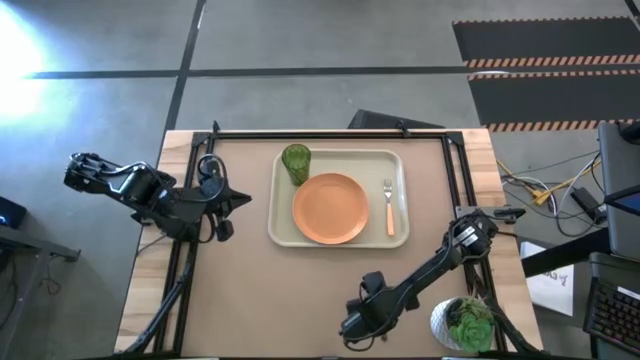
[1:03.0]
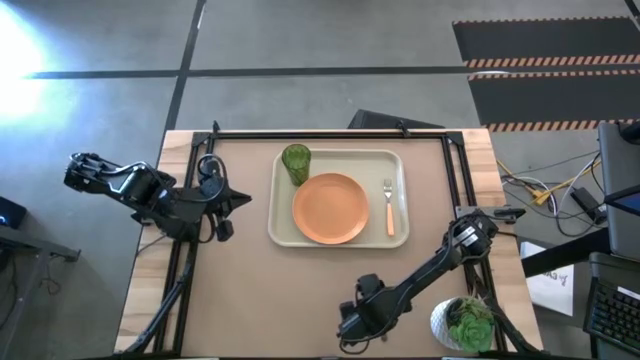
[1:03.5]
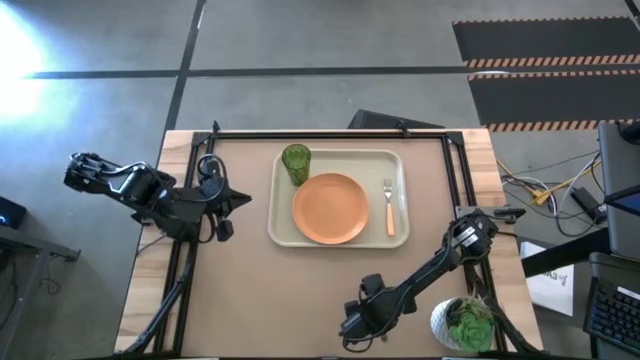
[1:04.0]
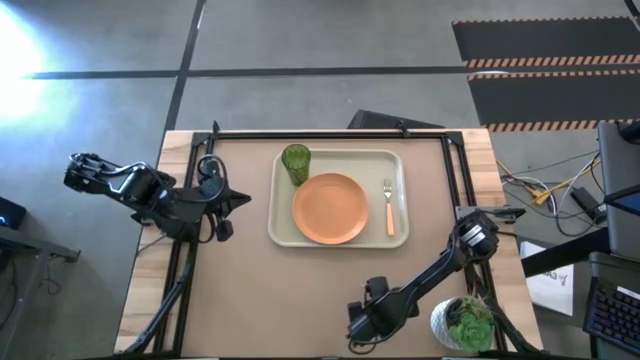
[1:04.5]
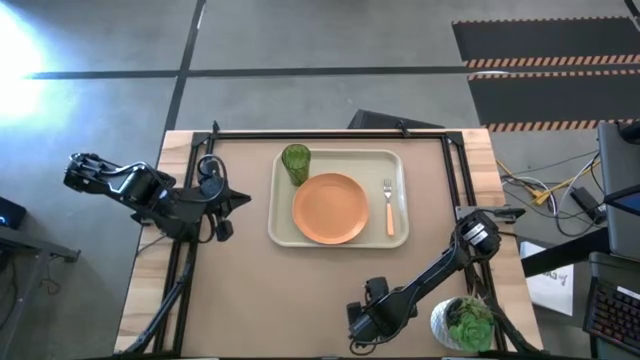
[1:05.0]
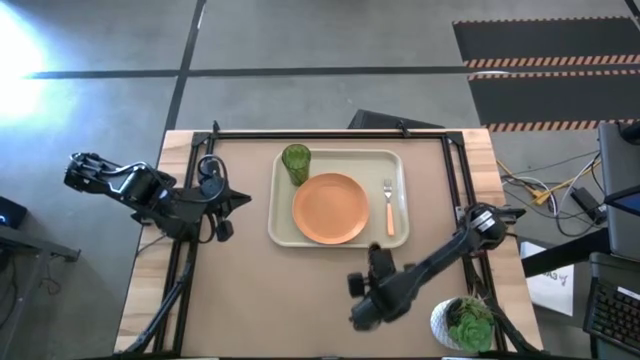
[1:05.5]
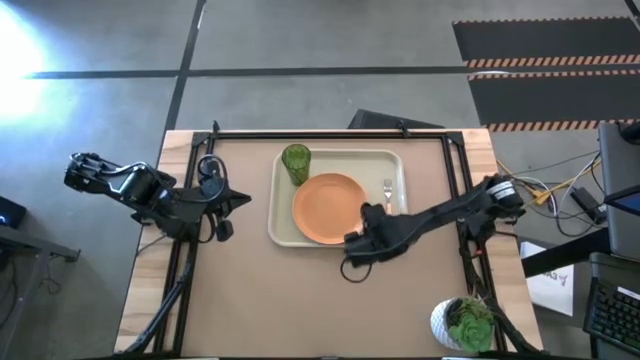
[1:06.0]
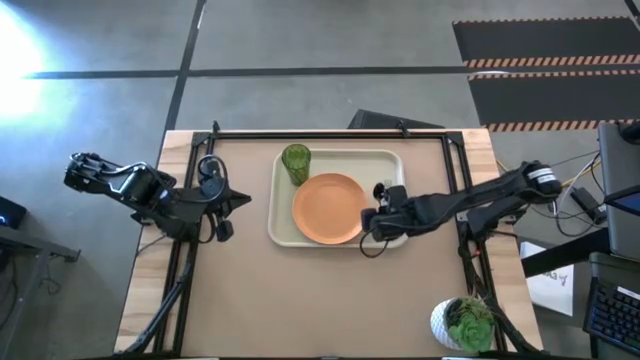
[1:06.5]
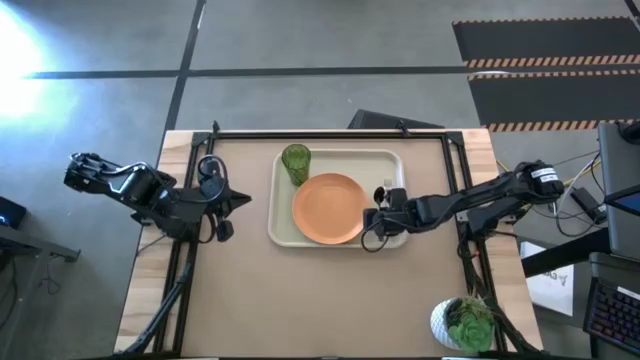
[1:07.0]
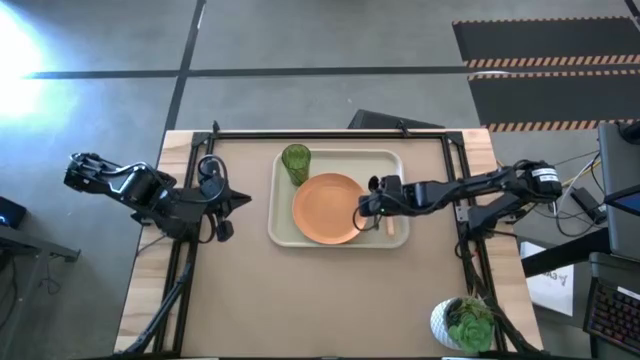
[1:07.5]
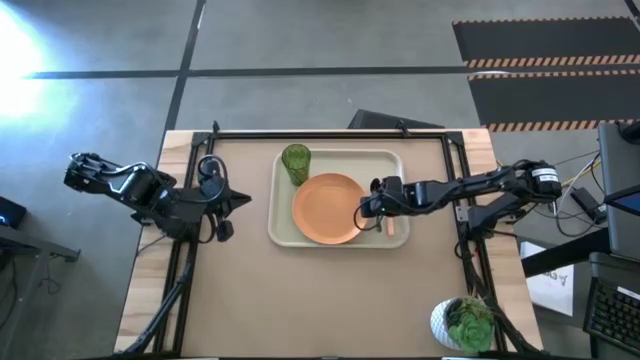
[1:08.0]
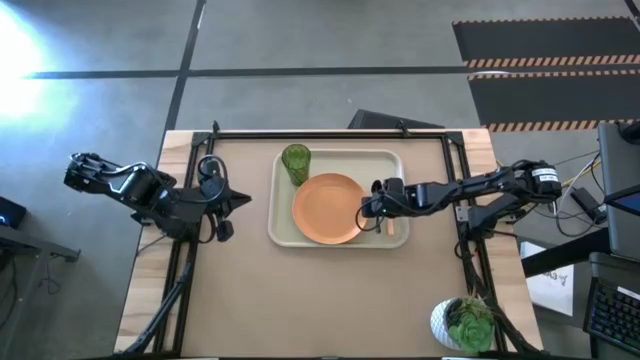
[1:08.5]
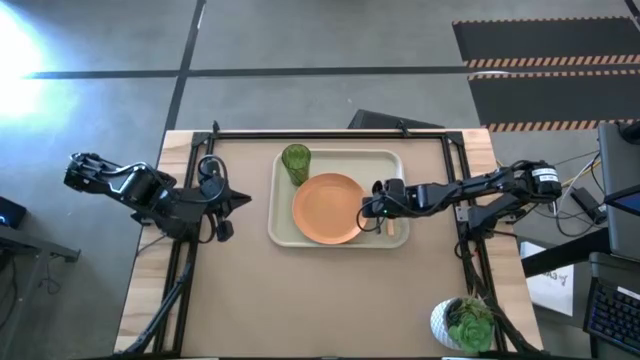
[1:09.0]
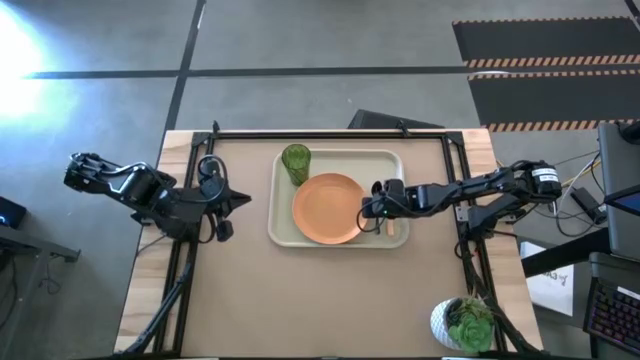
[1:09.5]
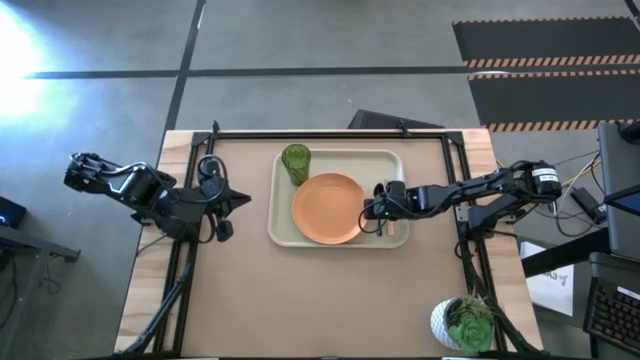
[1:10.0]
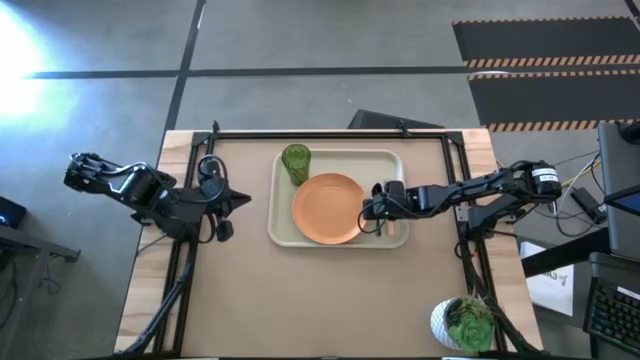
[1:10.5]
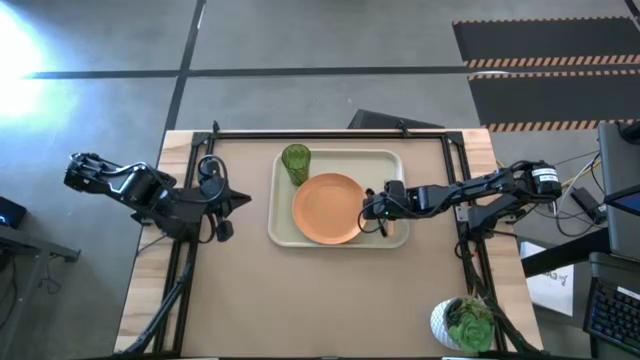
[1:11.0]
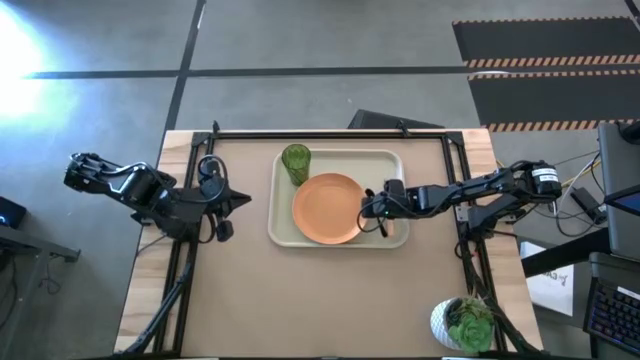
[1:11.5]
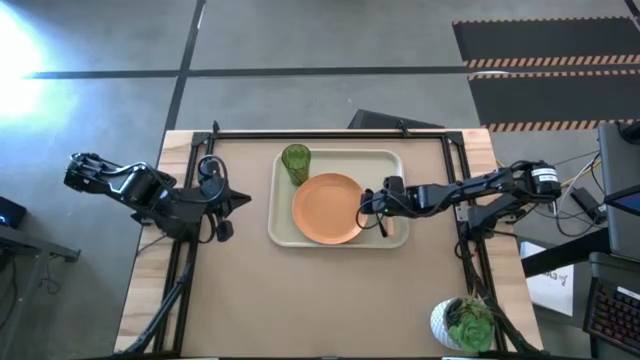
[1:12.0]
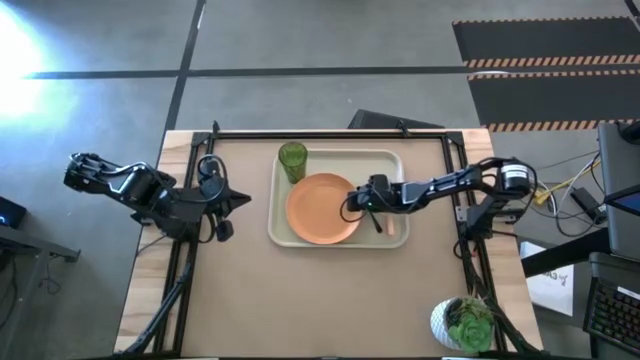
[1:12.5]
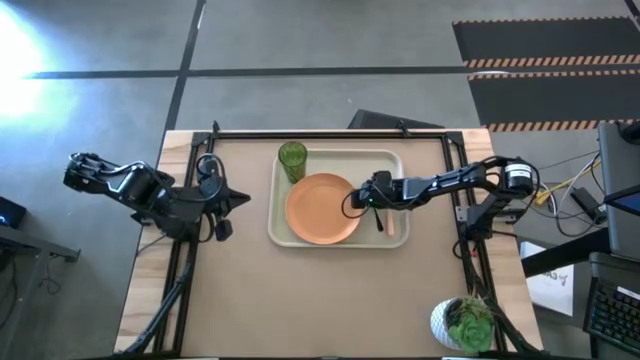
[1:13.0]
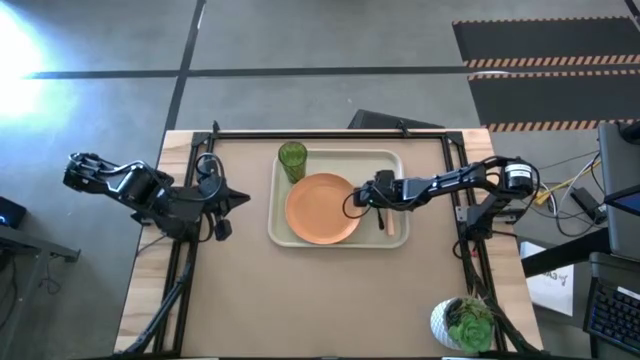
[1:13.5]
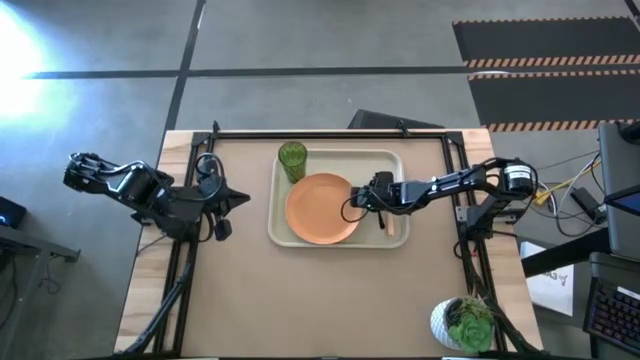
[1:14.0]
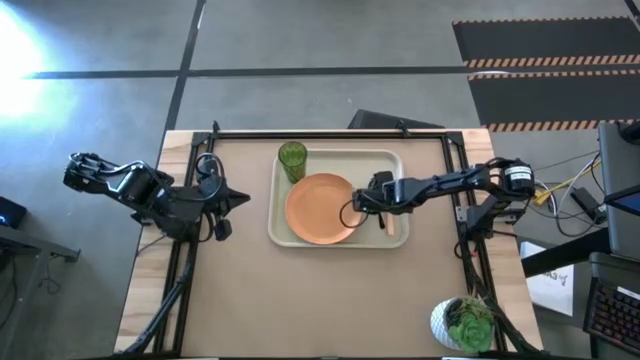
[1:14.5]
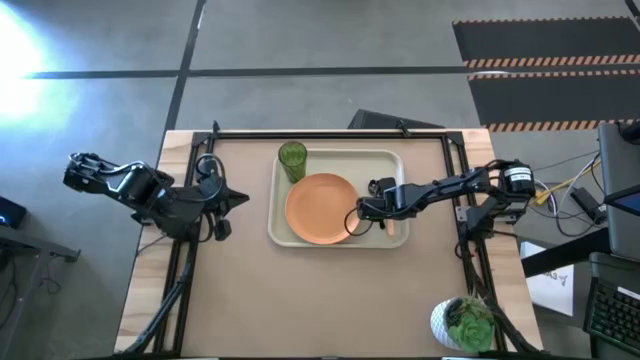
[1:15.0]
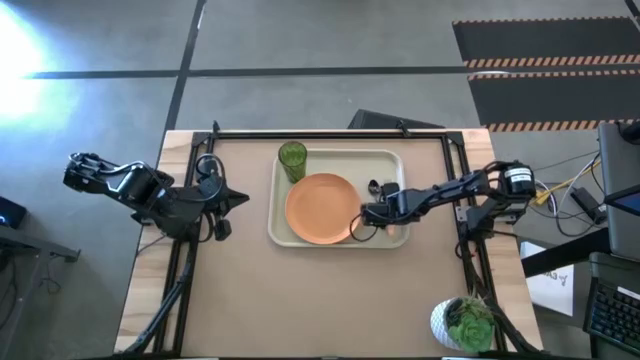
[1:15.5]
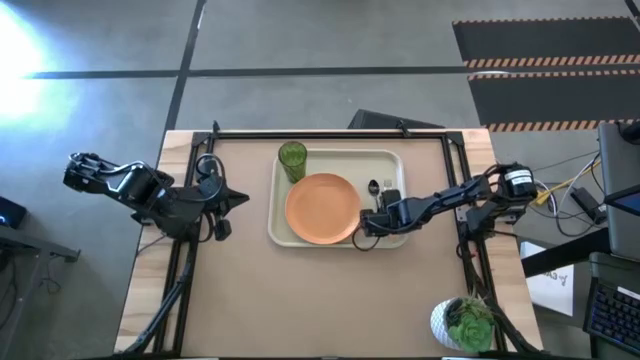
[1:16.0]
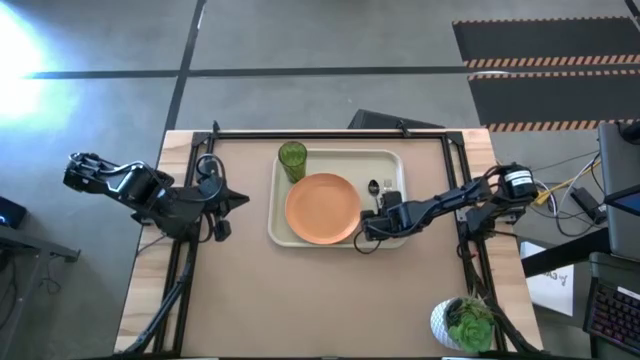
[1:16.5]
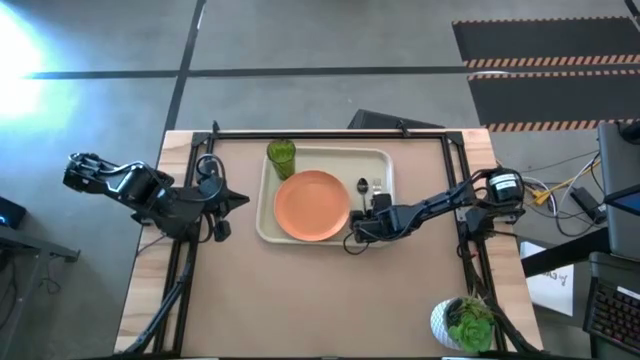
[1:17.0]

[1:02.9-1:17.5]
Task: Pick and place plate/cup/fork/spoon on tray
Put the black spoon on the light brown serving tray to the right of the orange plate

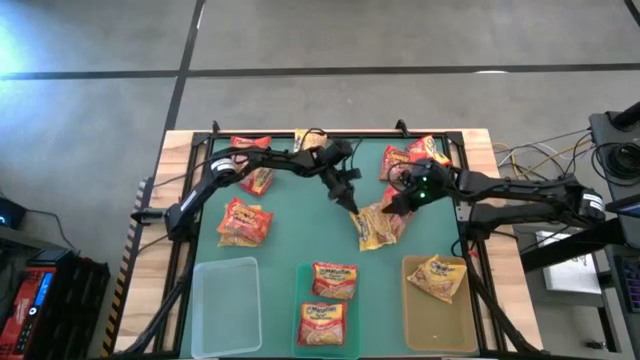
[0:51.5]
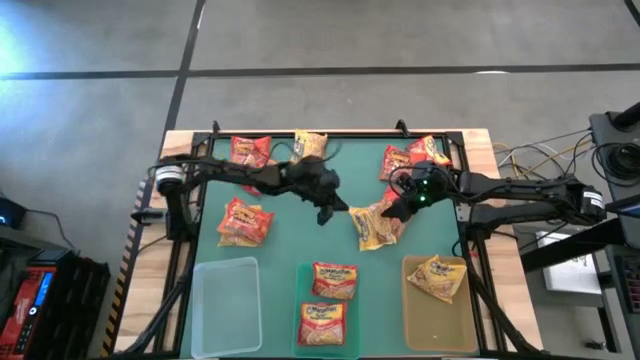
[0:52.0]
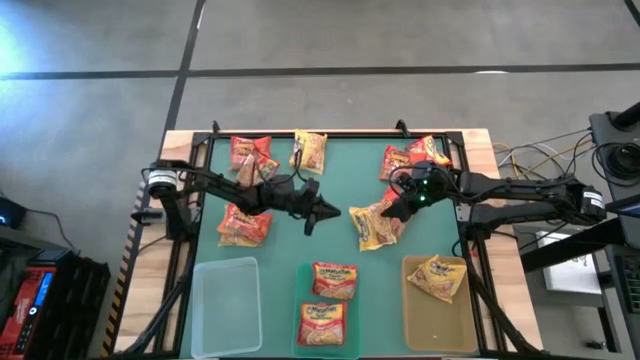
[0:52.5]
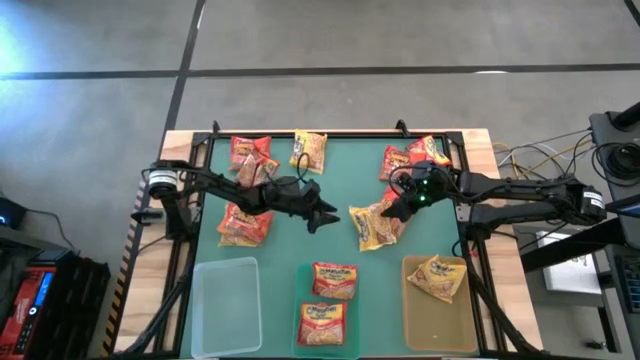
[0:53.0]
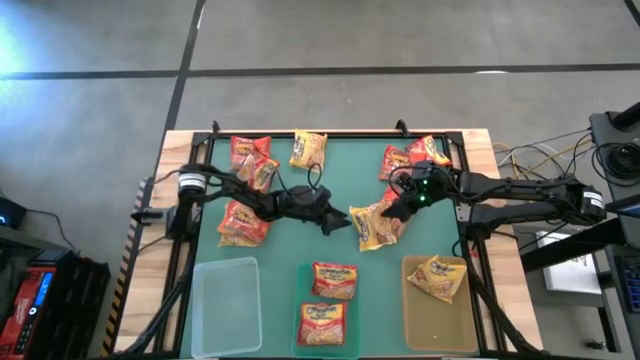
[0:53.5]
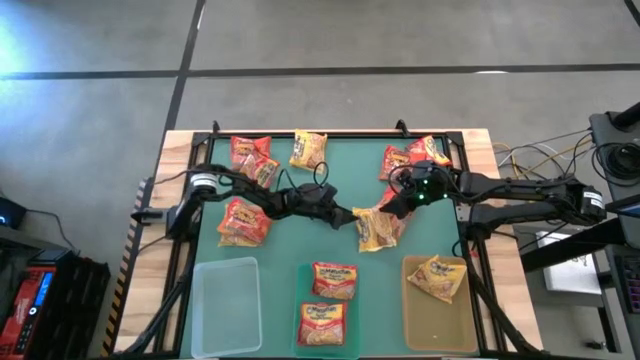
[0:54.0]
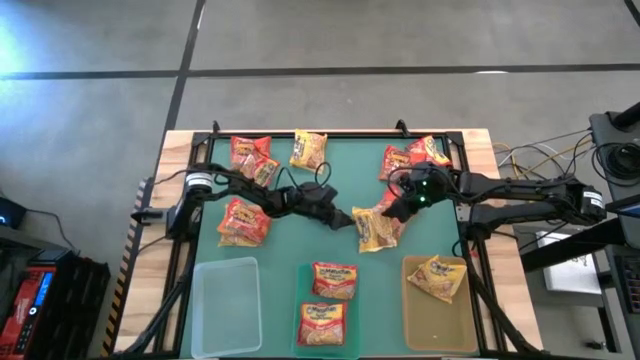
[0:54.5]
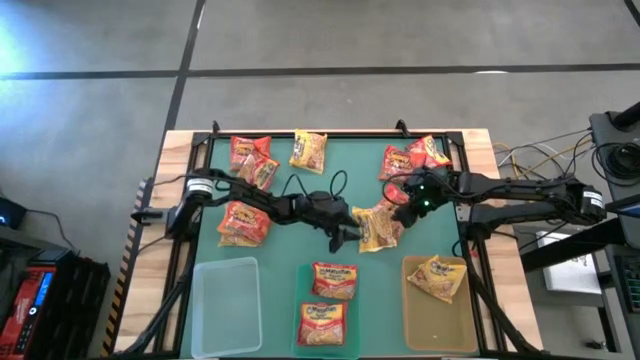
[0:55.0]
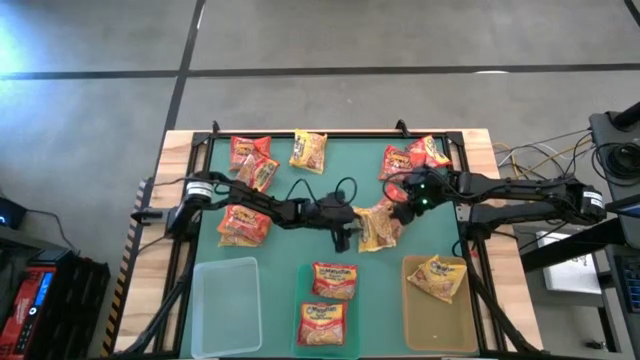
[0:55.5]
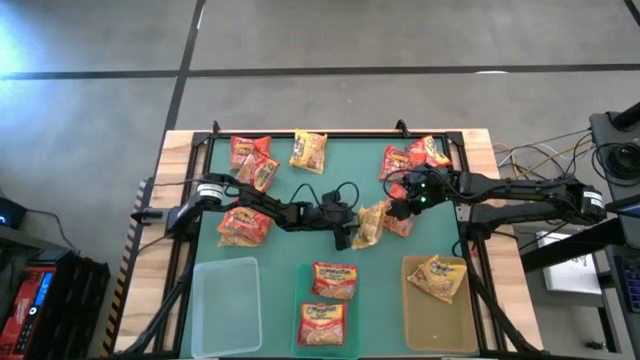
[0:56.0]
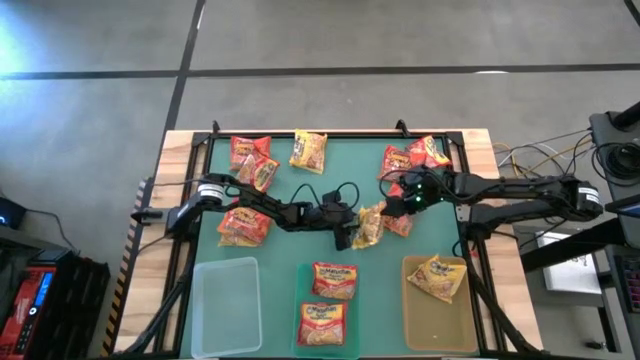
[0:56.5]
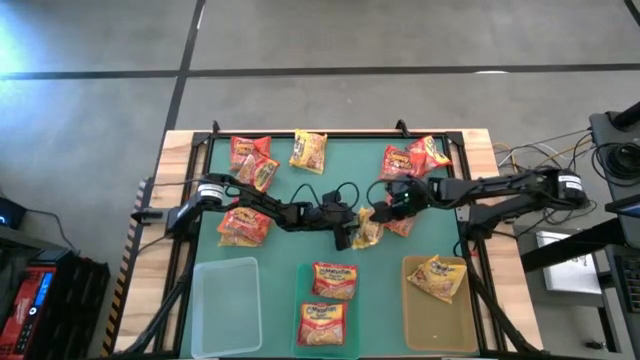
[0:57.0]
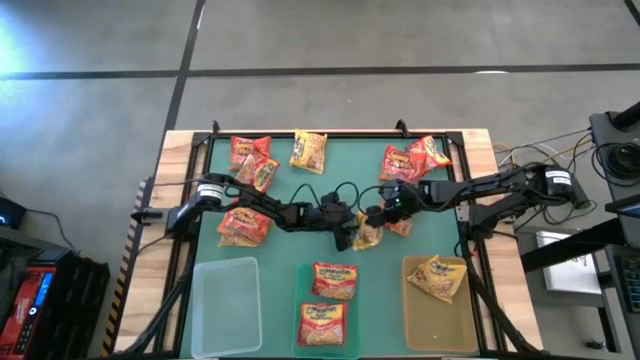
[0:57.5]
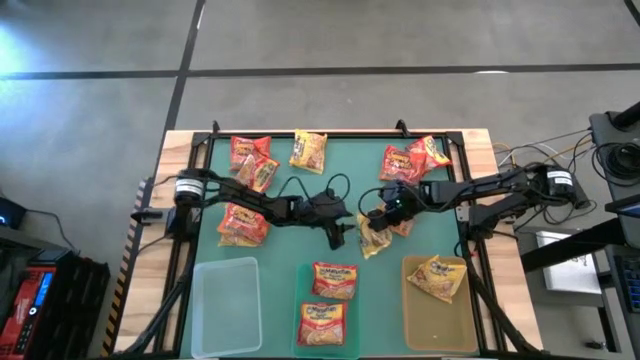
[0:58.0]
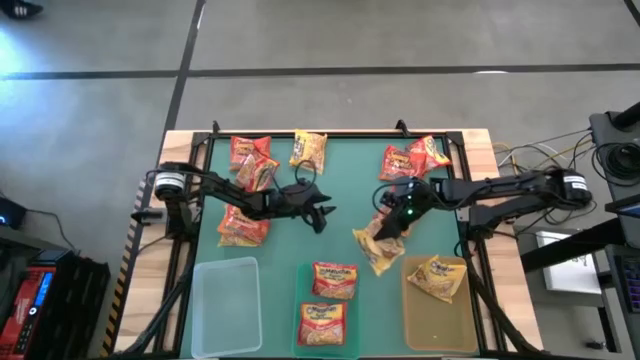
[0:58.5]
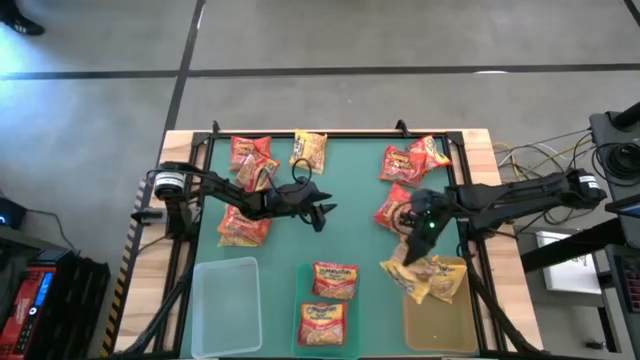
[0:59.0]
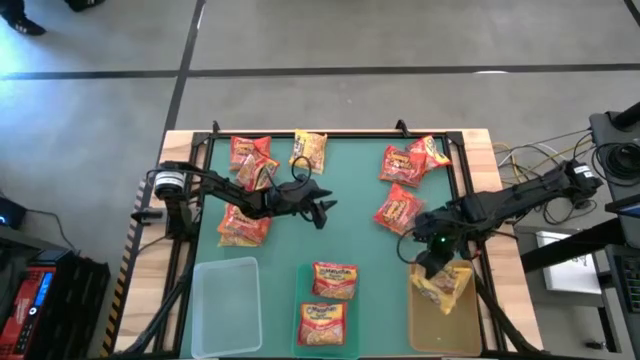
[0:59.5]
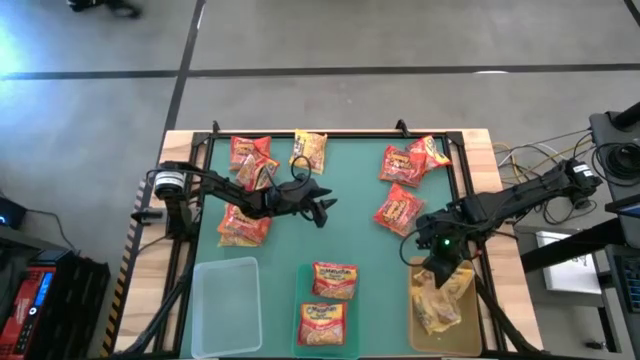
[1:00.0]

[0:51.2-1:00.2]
Task: Sort Maruchan noodles
Put the yellow noodle pack into the orange bin
